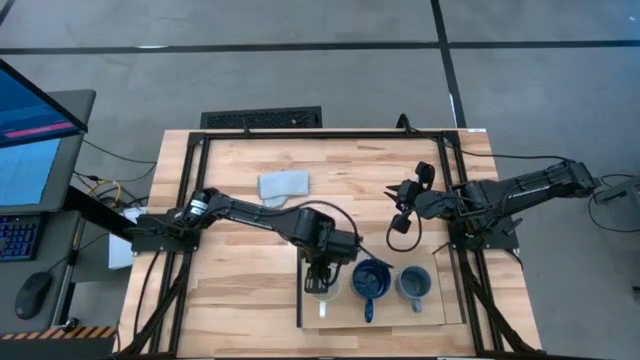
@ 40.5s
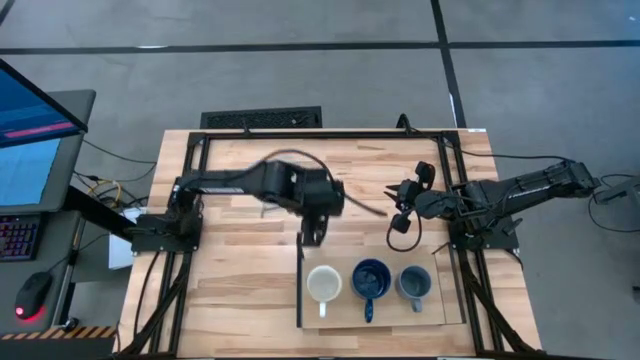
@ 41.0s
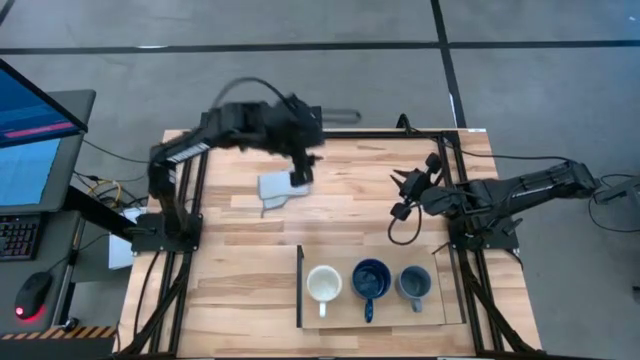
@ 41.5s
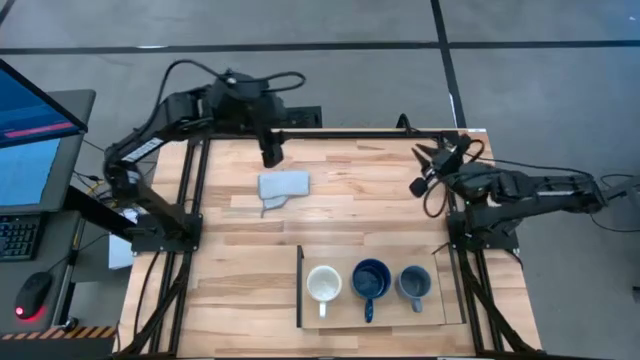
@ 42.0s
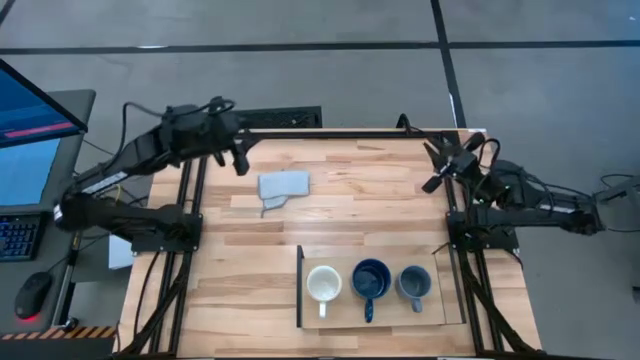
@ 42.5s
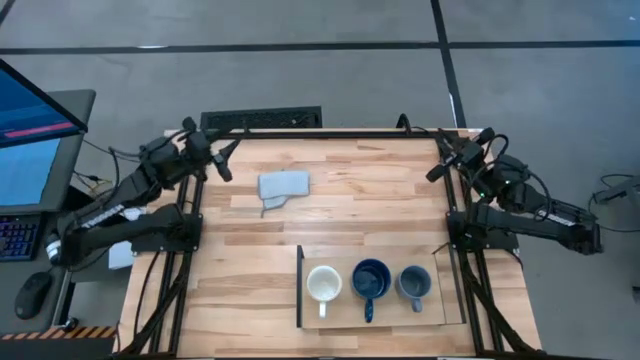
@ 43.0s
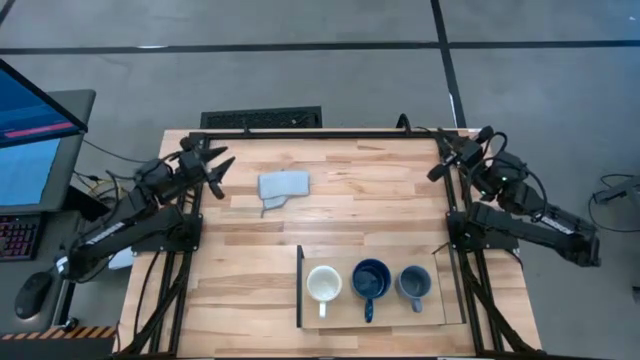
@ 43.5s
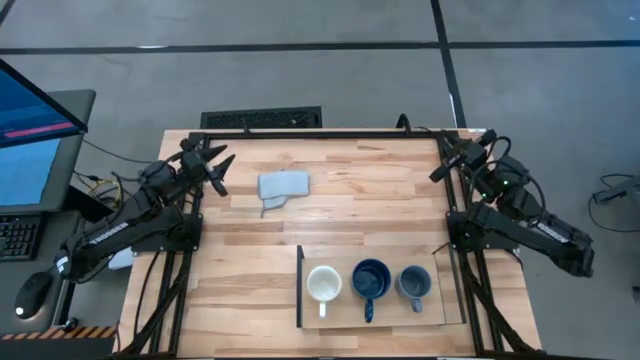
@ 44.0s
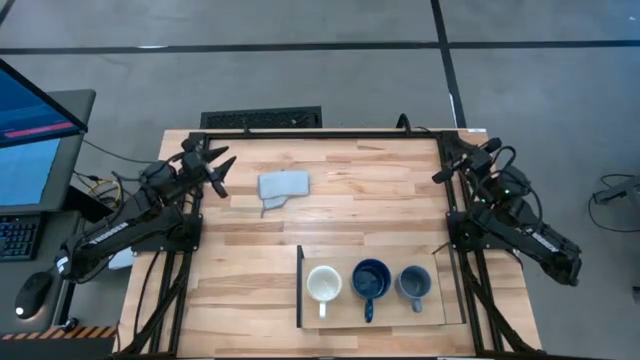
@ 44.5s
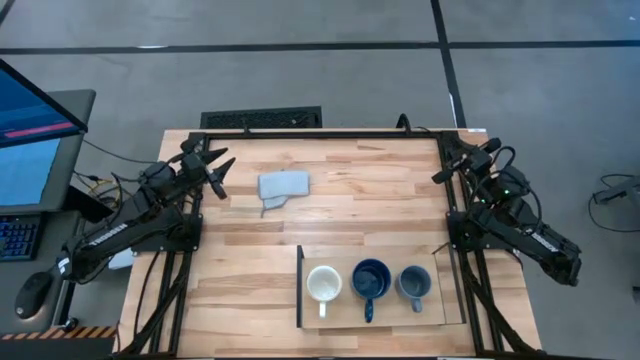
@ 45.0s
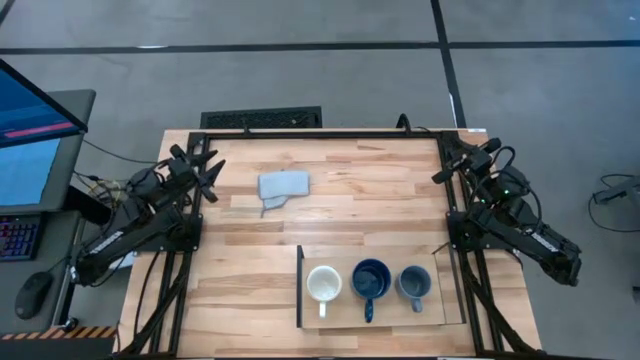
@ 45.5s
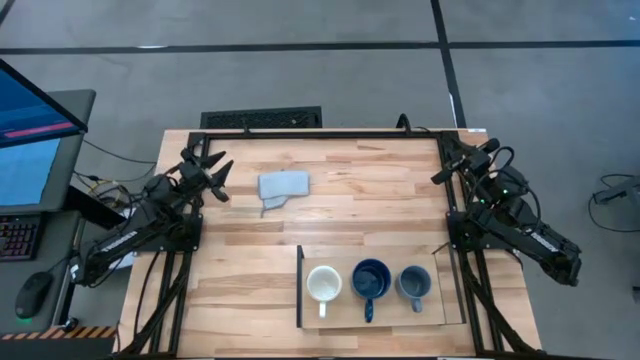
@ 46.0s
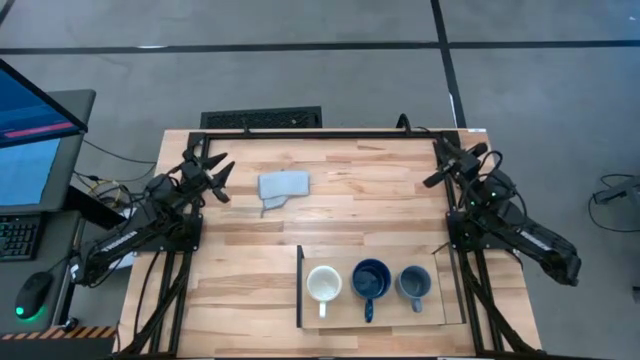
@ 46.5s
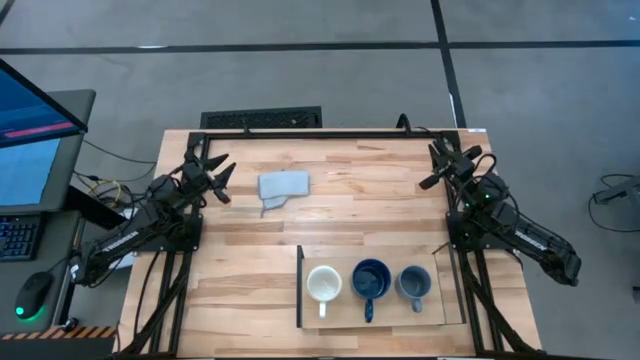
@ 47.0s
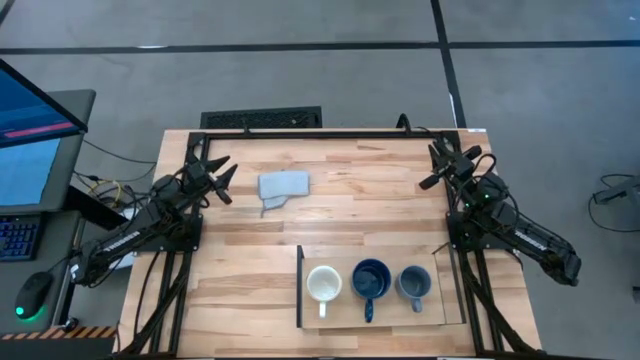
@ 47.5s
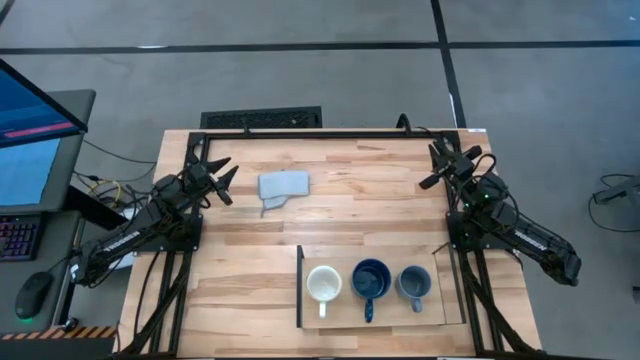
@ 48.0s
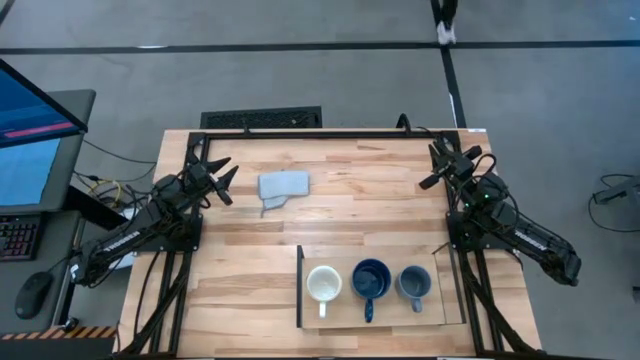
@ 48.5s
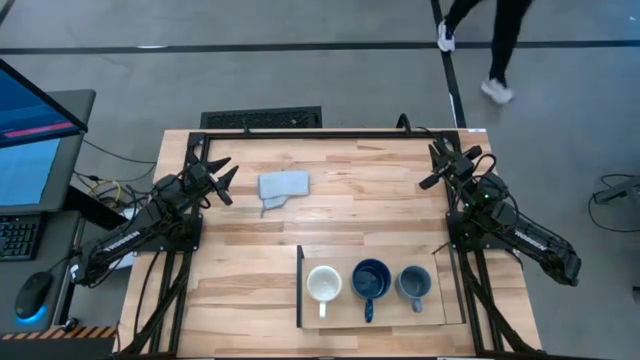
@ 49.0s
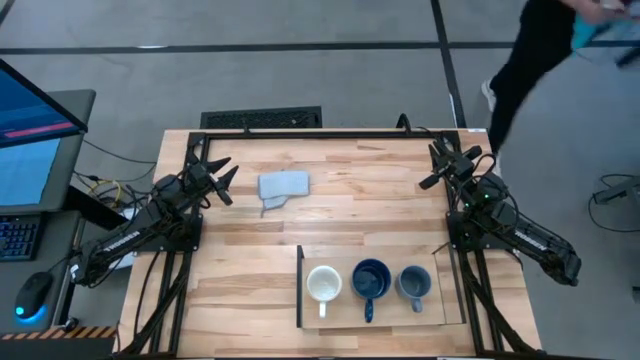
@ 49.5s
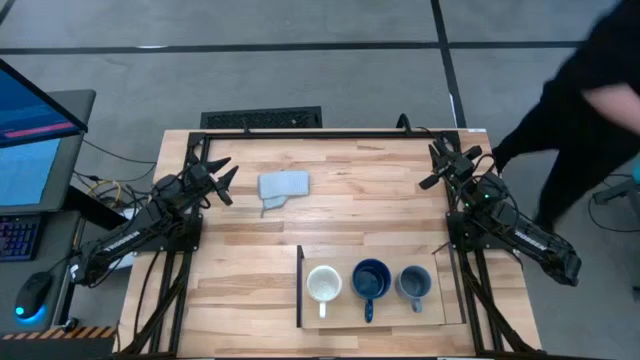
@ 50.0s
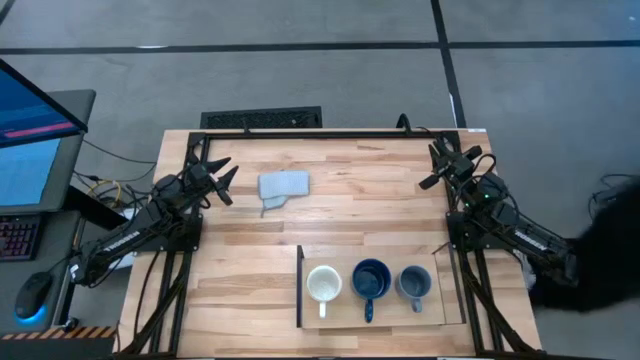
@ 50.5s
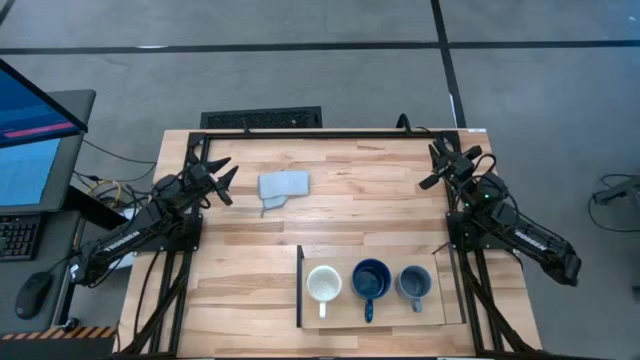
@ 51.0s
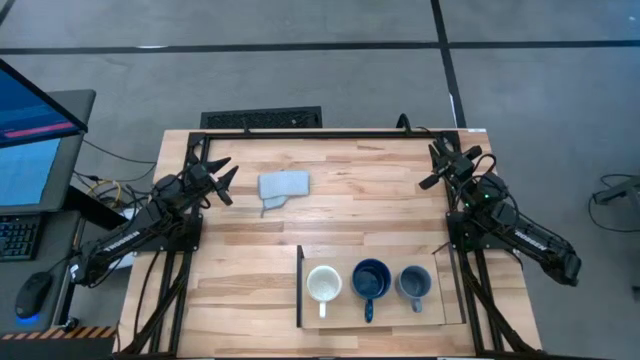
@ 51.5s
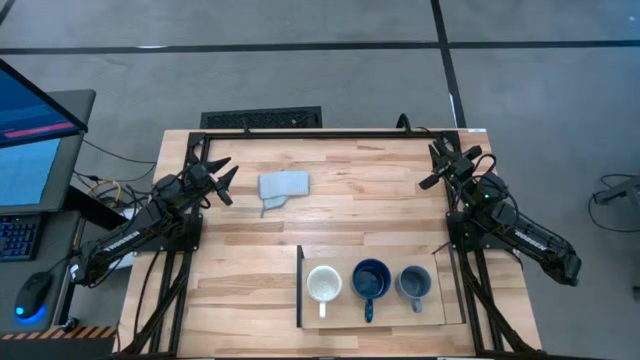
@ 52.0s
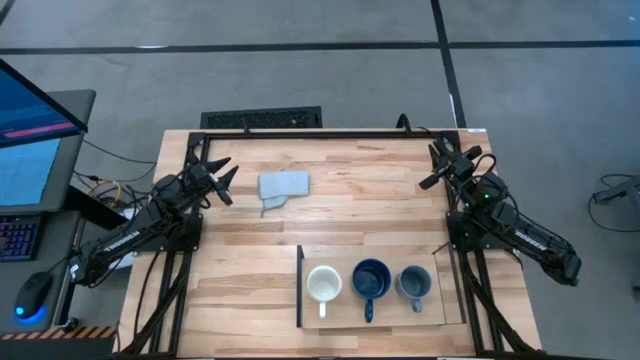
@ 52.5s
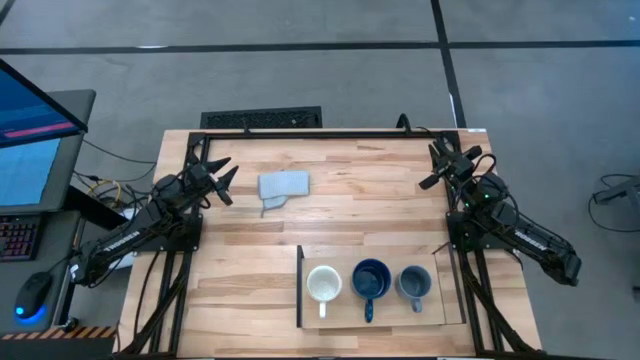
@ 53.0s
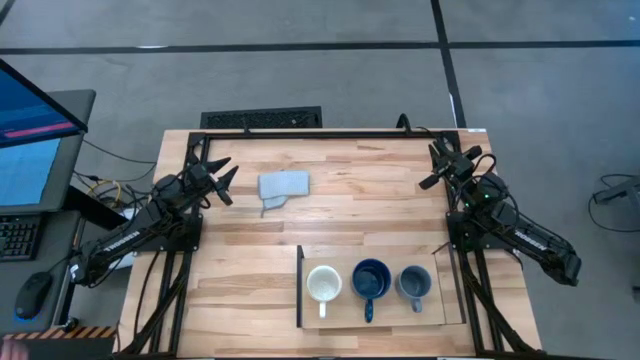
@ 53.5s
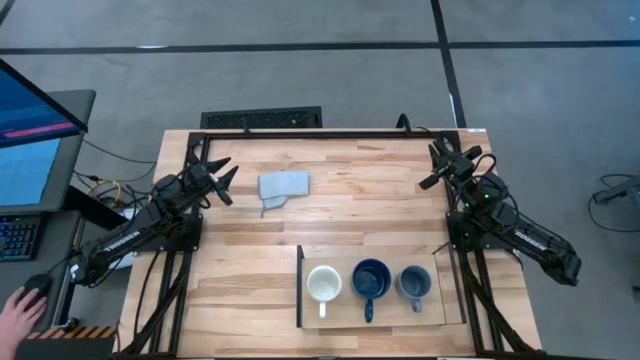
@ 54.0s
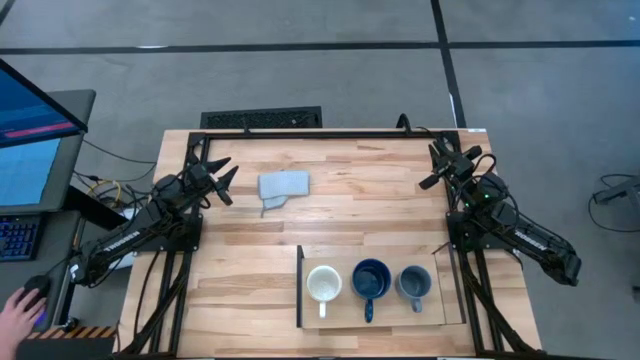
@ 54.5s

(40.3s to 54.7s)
Task: Stack small to large cups/mugs on shelf
Return to Home Position

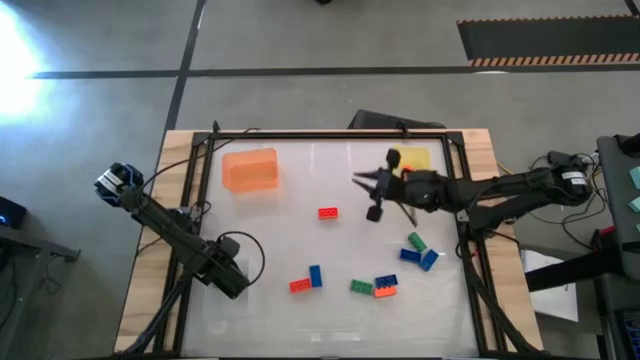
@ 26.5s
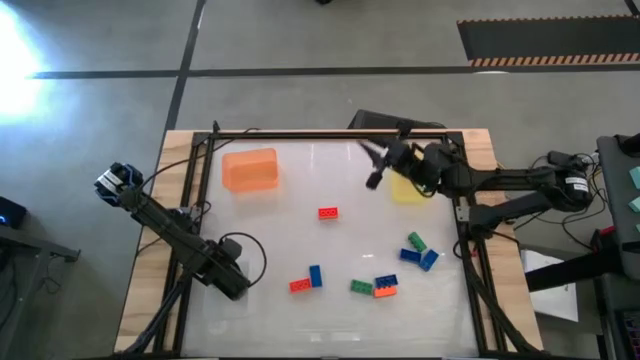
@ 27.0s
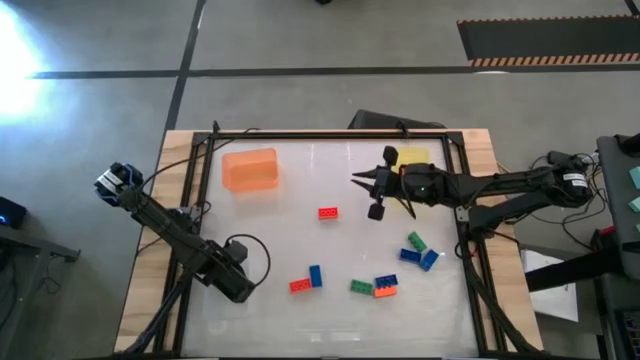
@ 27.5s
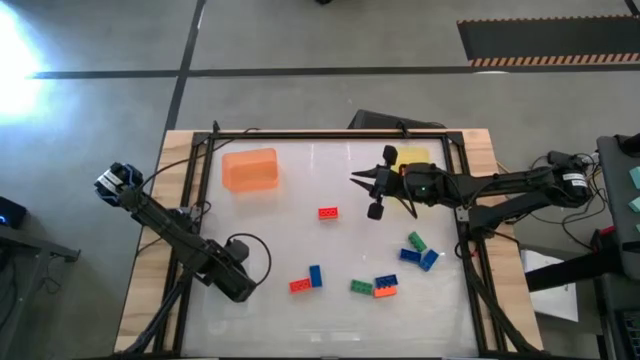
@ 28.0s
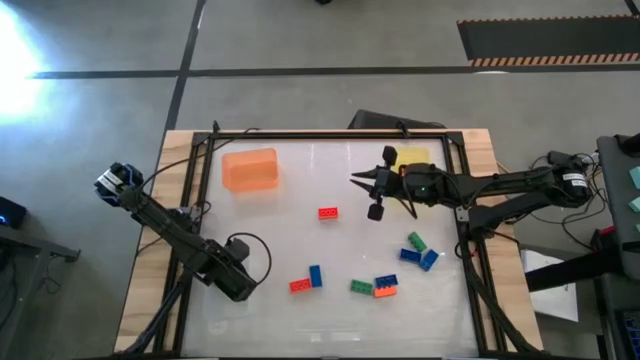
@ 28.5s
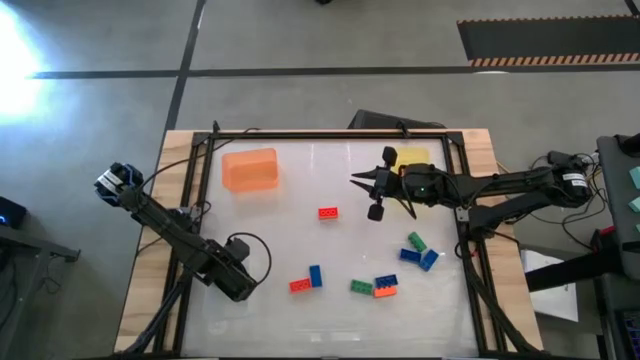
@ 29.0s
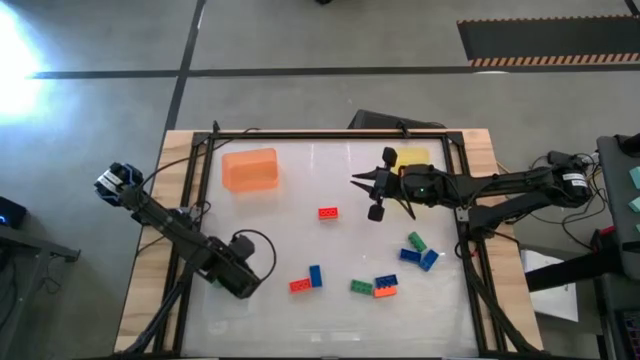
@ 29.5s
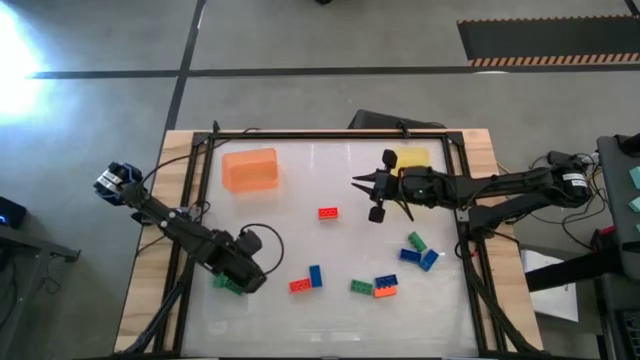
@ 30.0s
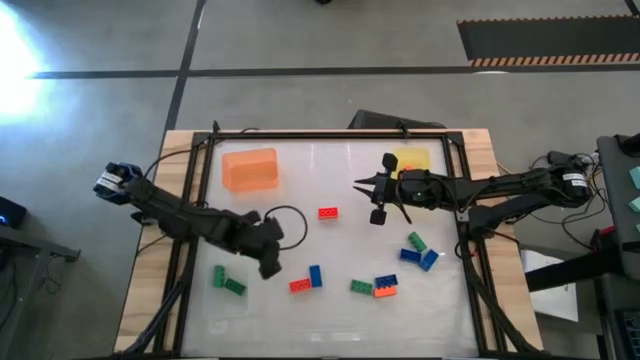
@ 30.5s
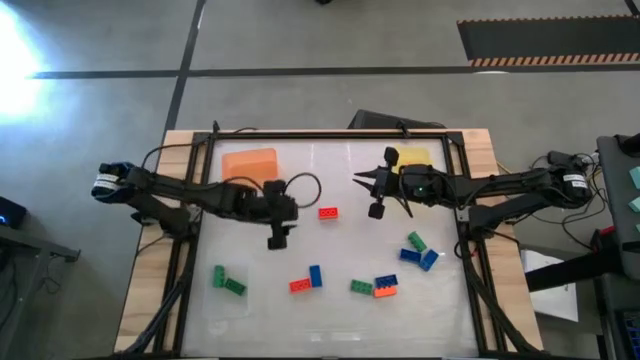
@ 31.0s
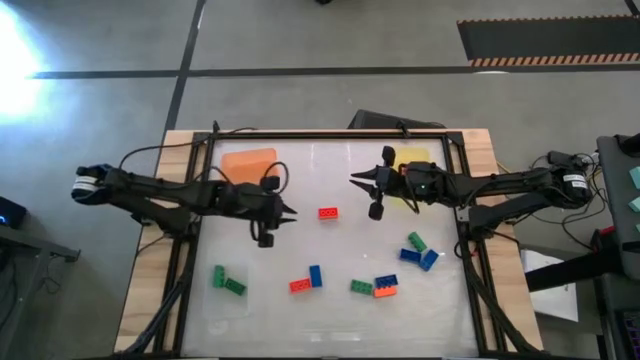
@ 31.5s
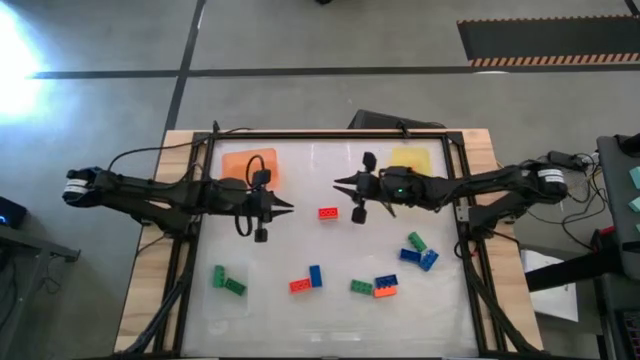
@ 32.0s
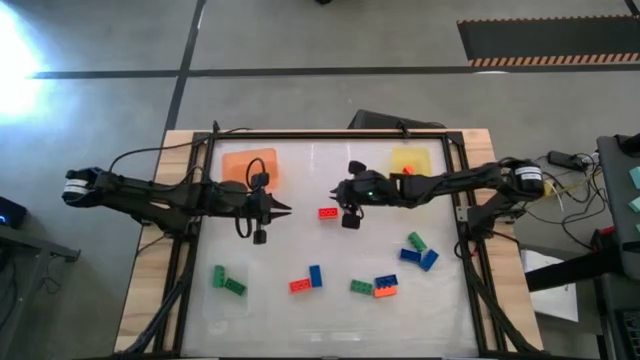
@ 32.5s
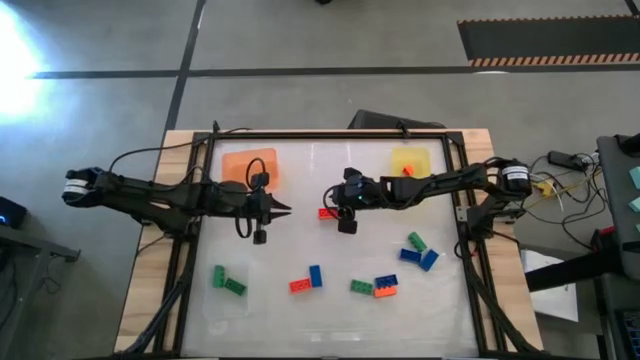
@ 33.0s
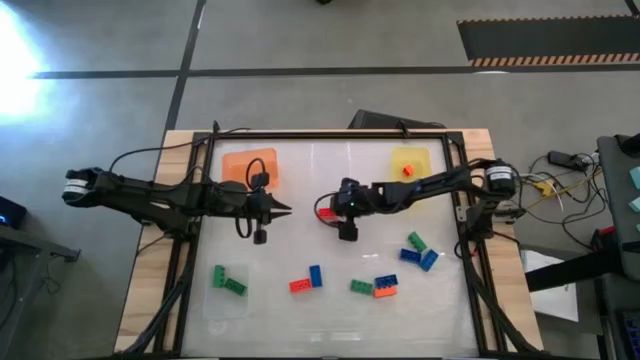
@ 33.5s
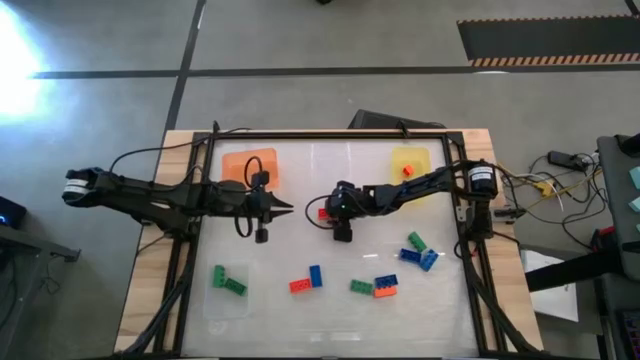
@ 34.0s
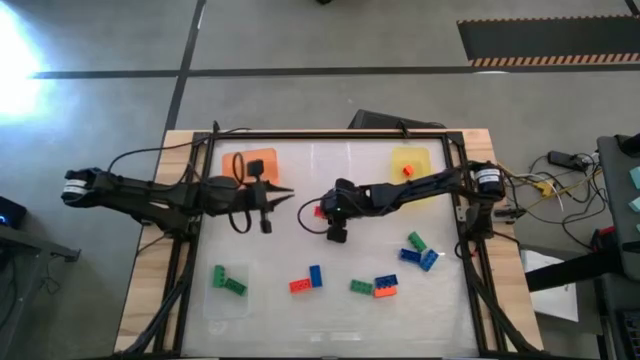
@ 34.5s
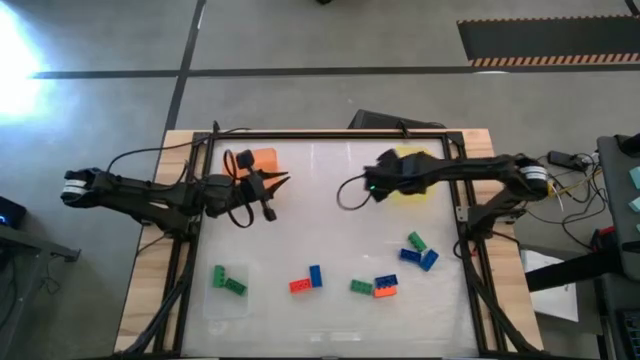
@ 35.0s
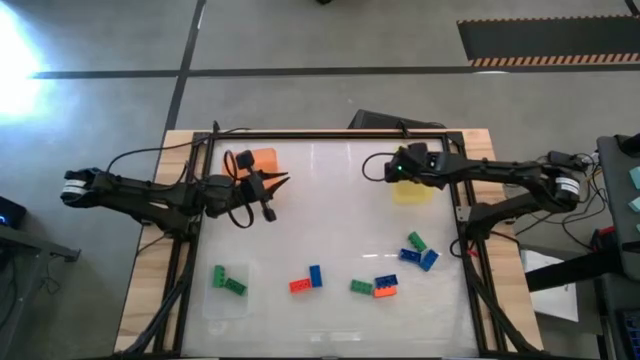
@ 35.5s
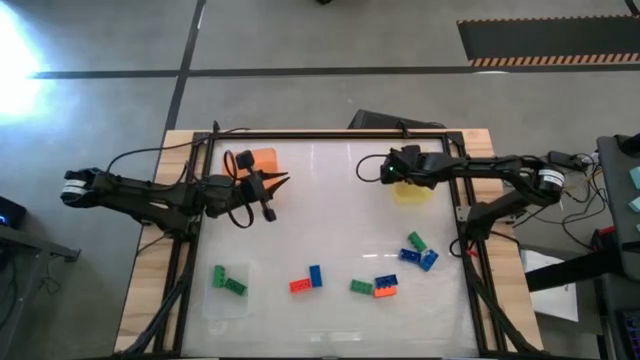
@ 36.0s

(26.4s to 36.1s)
Task: Sort & place blocks by color
Put the orange game piece into the yellow bin
